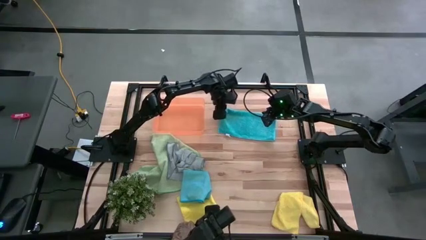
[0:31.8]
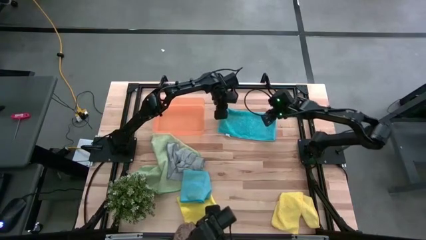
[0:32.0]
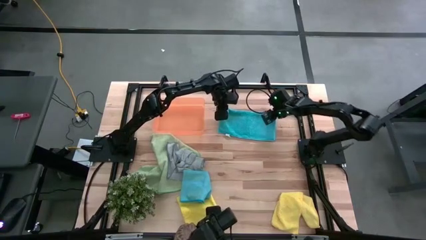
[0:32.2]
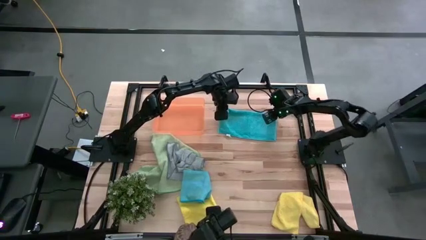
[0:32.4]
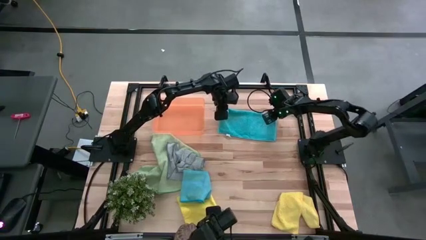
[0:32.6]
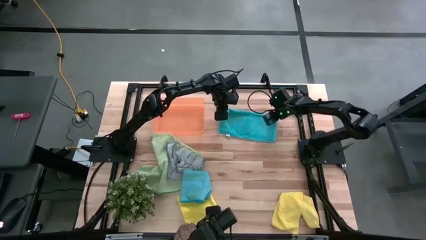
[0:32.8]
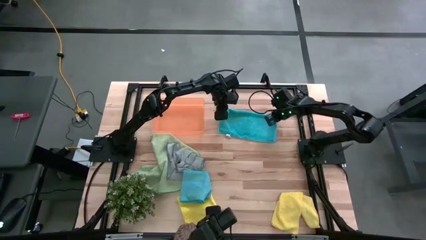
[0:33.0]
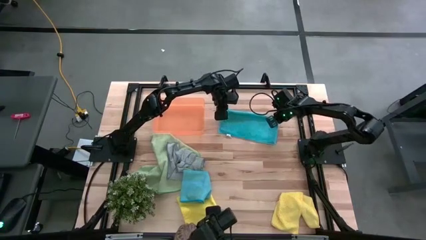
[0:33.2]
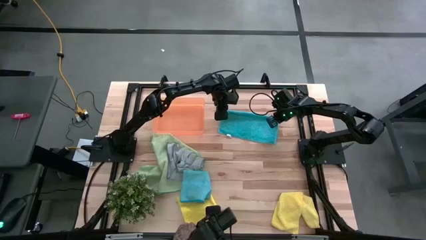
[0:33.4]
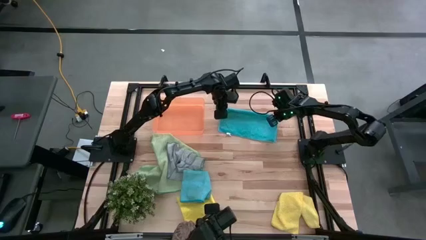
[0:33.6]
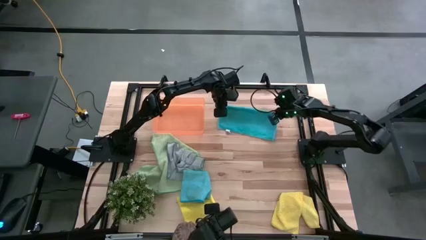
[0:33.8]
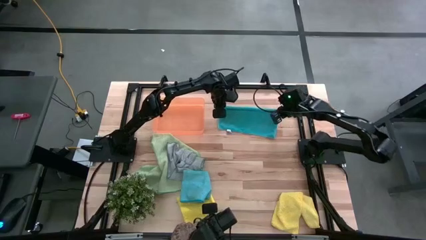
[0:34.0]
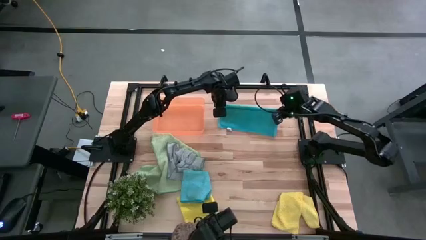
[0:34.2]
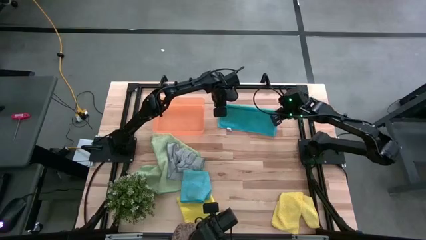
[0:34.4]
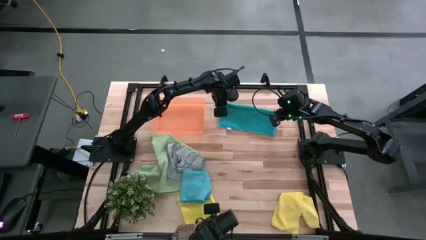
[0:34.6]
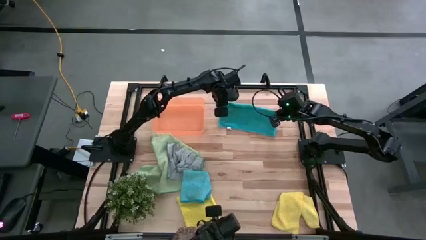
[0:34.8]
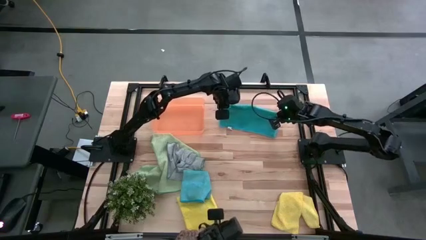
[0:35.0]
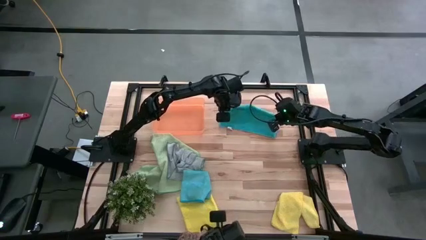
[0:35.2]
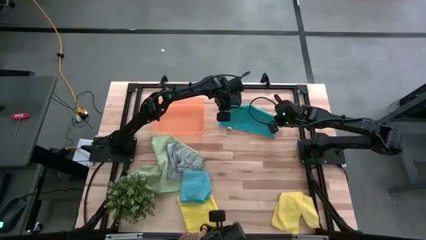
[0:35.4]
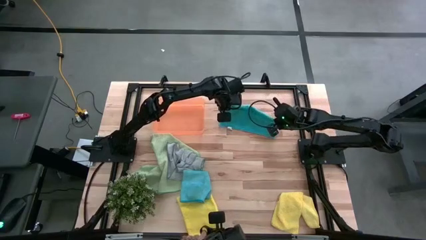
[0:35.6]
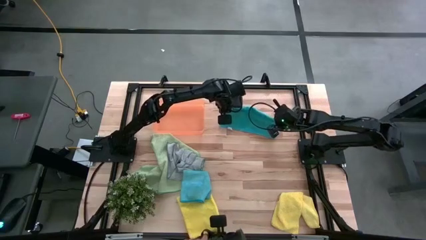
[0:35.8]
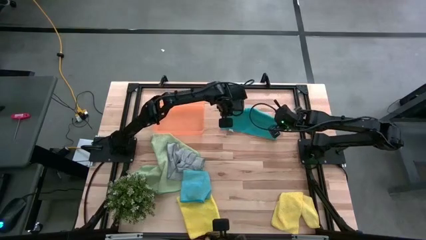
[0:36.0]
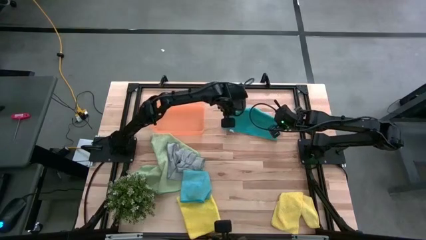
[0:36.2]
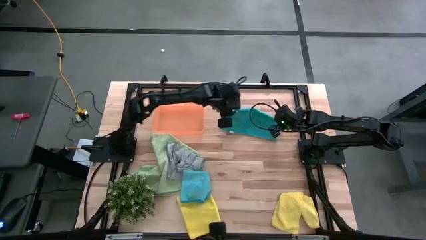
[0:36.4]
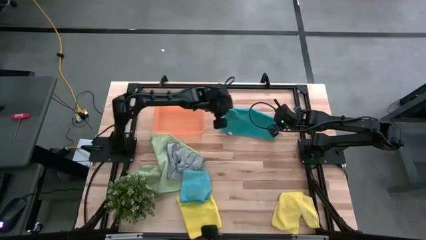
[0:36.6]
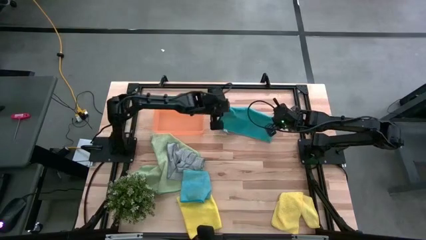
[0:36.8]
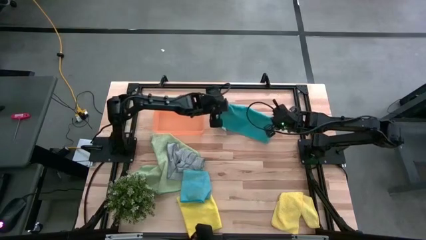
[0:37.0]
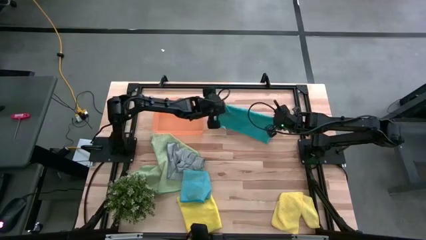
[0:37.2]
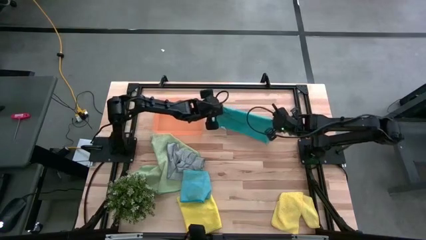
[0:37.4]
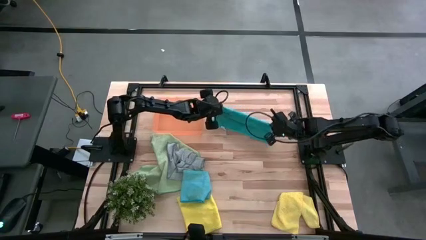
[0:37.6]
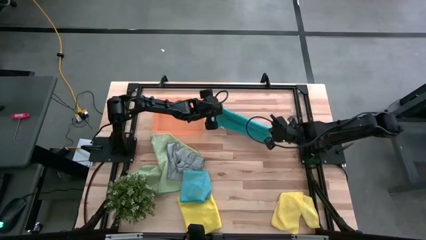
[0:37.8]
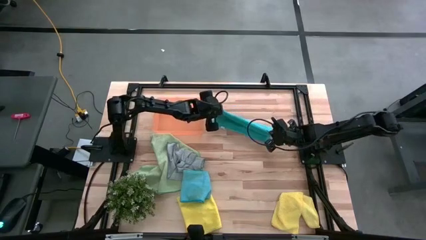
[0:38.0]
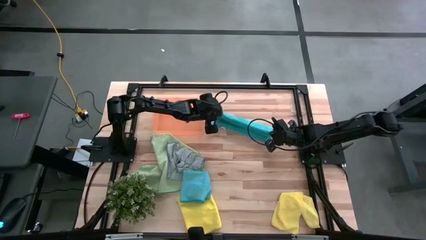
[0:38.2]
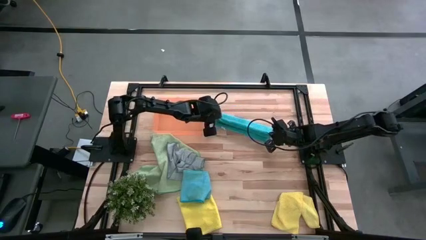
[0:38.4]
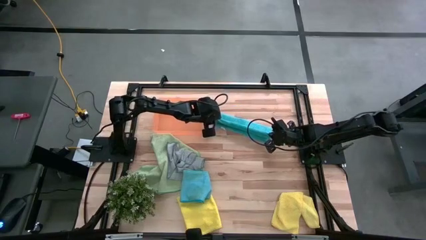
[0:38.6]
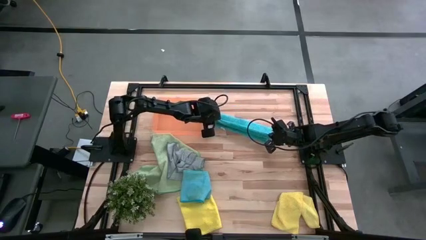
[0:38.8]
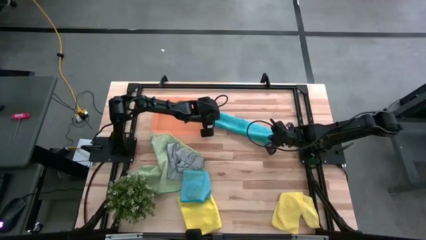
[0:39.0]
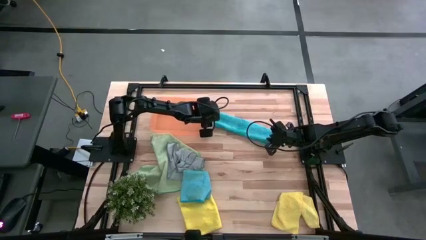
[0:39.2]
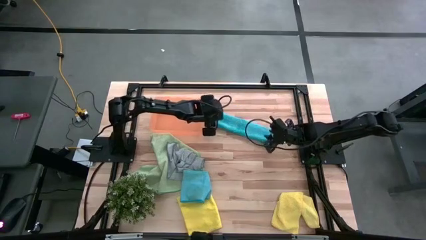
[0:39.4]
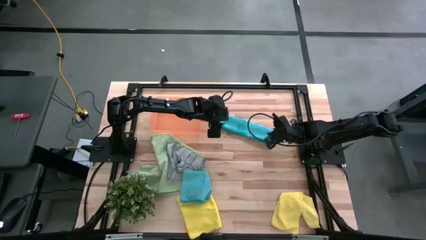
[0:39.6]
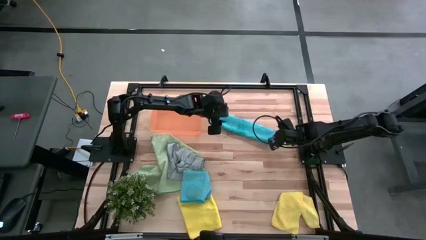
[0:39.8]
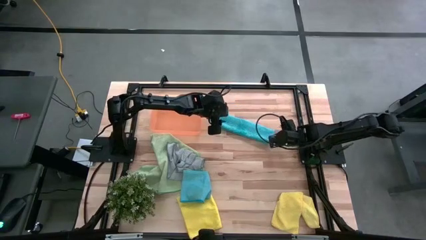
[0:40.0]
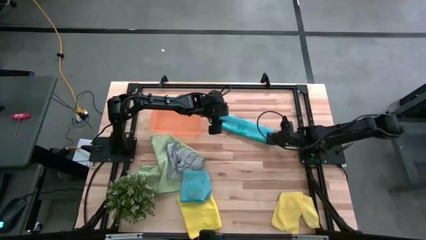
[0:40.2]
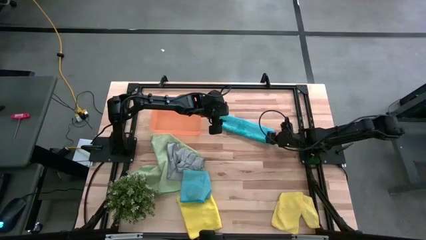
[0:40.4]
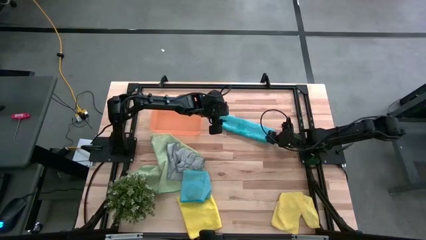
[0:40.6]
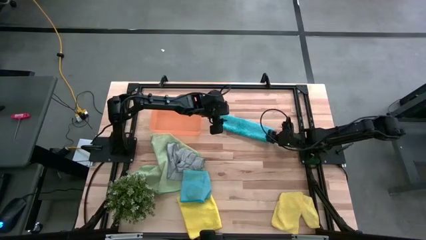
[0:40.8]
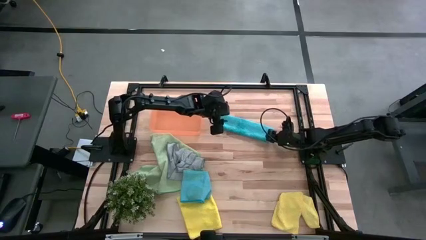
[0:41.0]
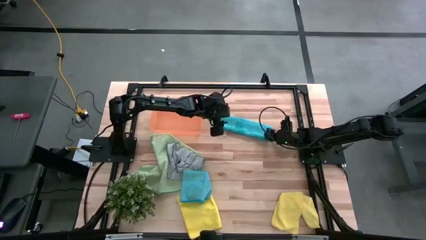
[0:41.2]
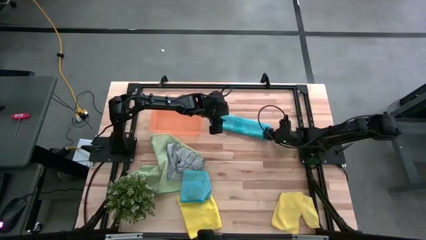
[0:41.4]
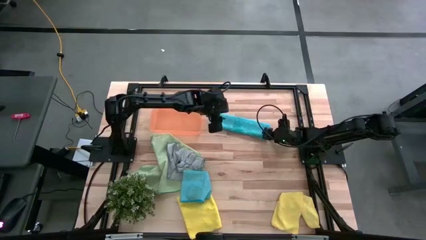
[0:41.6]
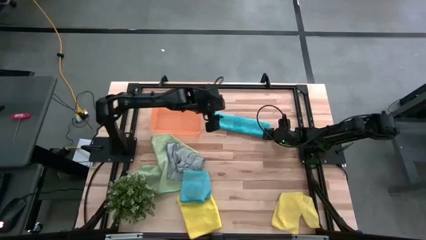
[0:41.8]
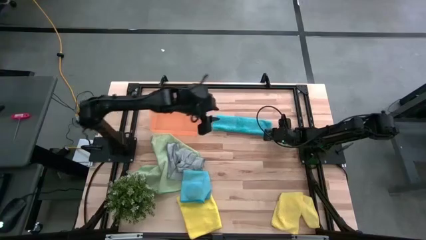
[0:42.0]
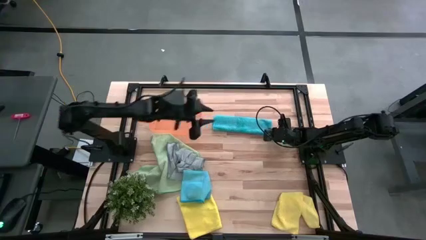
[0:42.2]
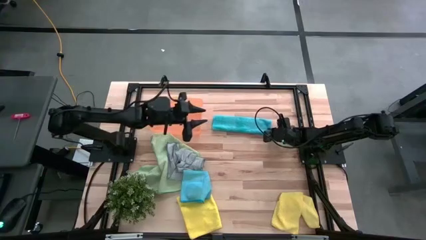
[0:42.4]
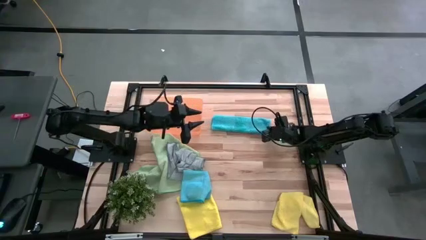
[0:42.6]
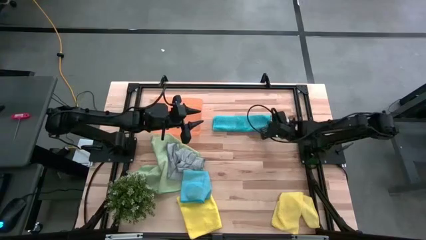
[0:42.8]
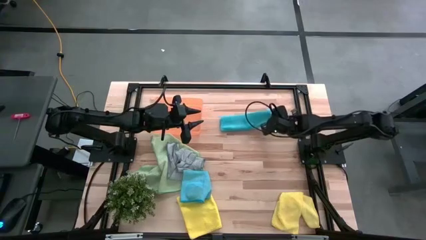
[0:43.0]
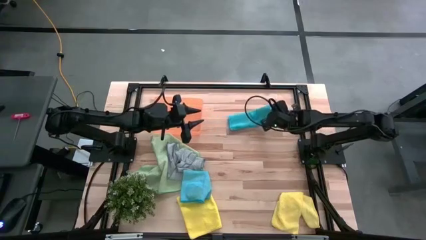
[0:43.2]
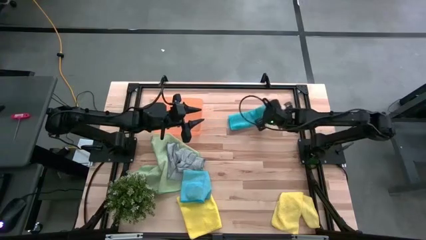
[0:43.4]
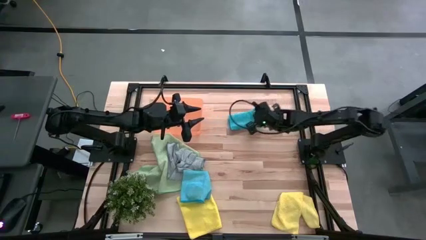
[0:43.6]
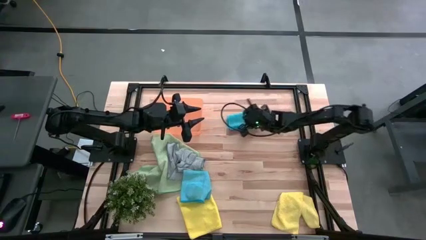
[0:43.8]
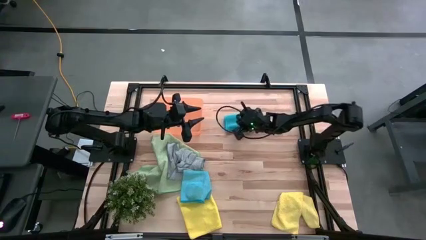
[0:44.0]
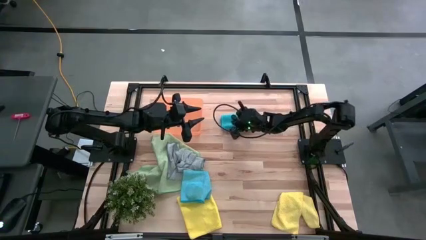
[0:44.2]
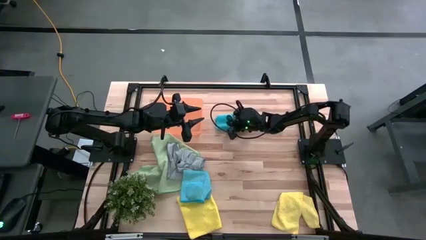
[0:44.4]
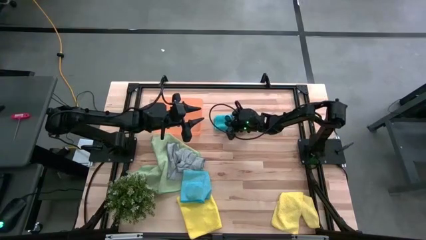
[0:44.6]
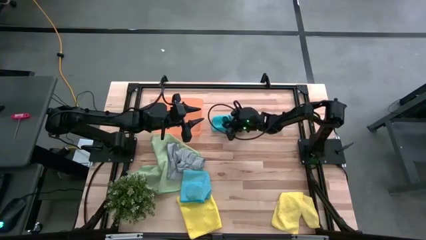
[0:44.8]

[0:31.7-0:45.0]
Task: Fold microfiber towels
Fold the top blue microfiber cloth
